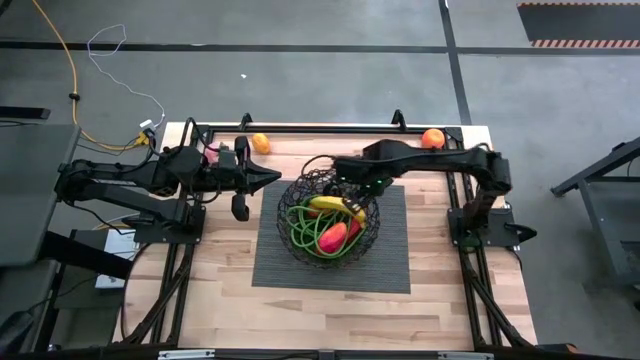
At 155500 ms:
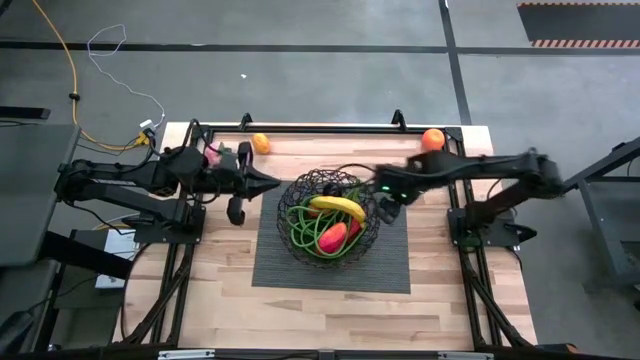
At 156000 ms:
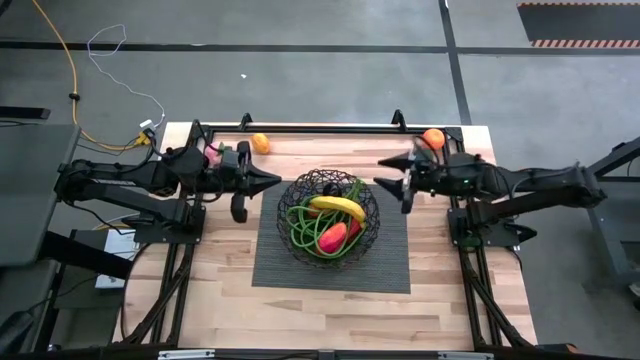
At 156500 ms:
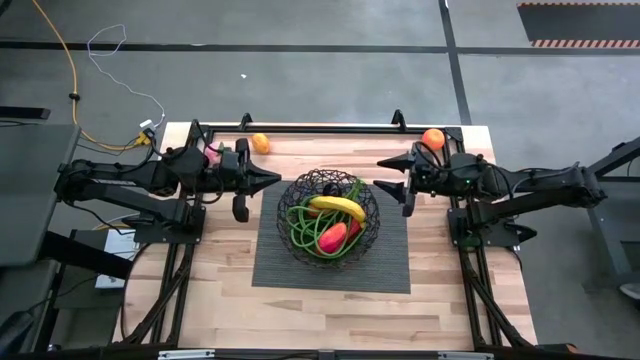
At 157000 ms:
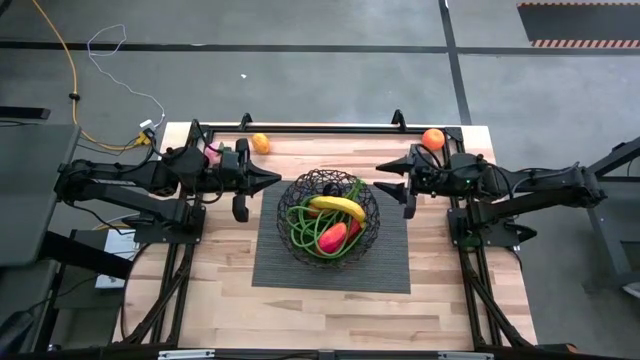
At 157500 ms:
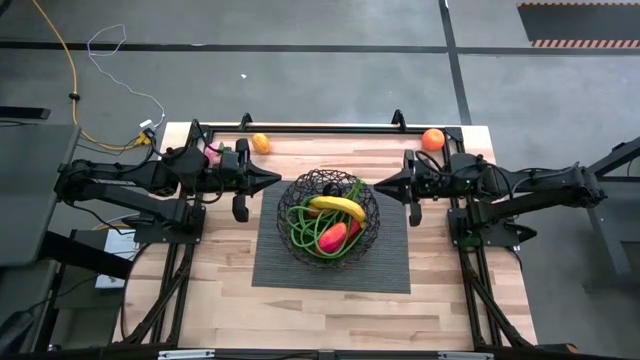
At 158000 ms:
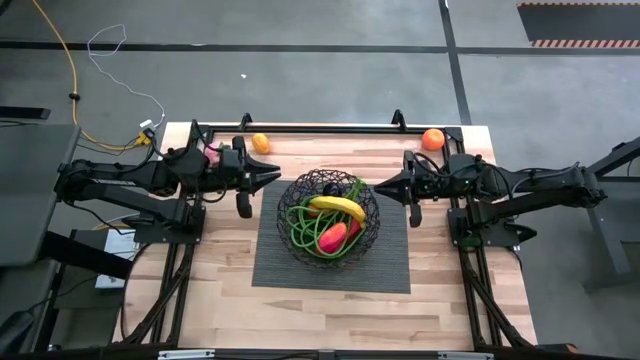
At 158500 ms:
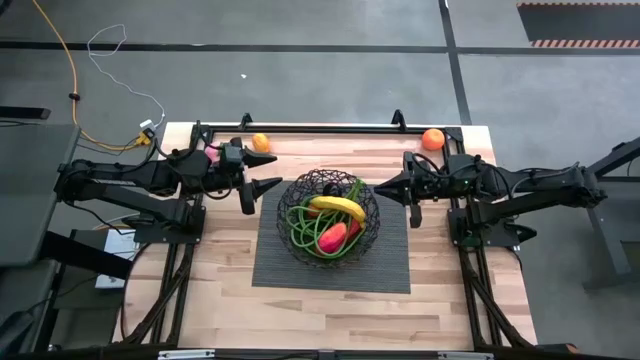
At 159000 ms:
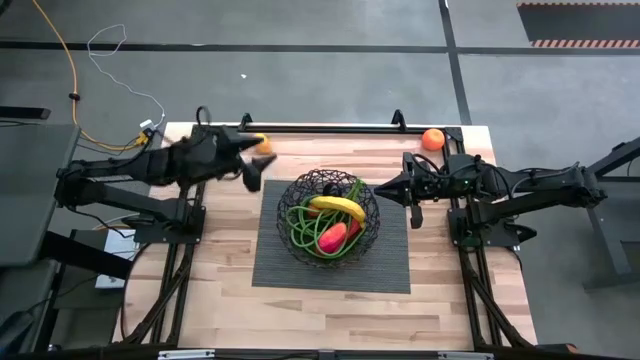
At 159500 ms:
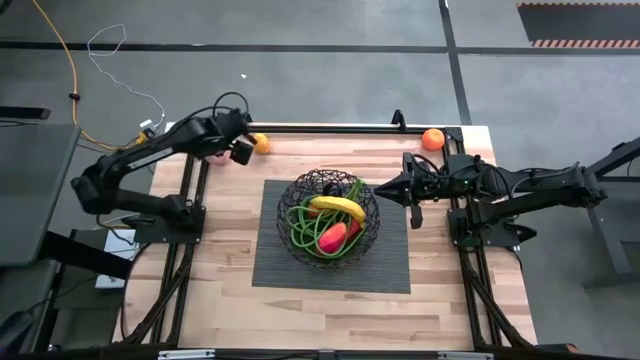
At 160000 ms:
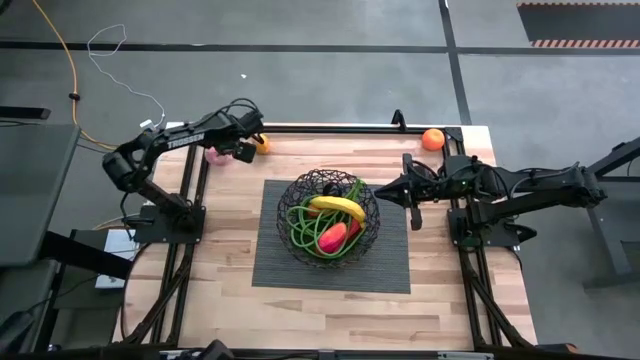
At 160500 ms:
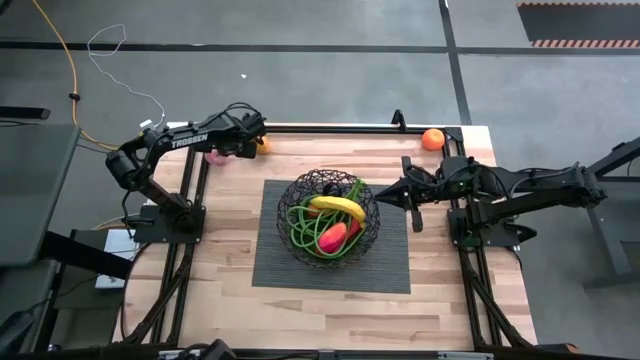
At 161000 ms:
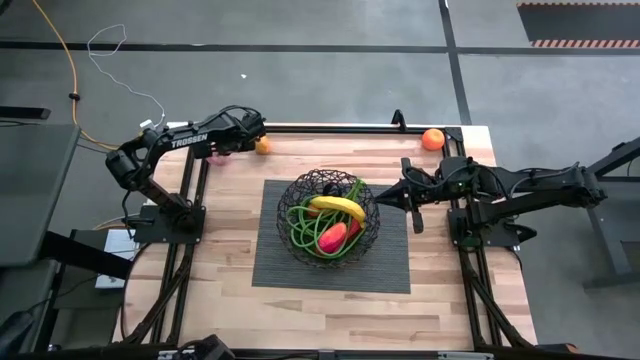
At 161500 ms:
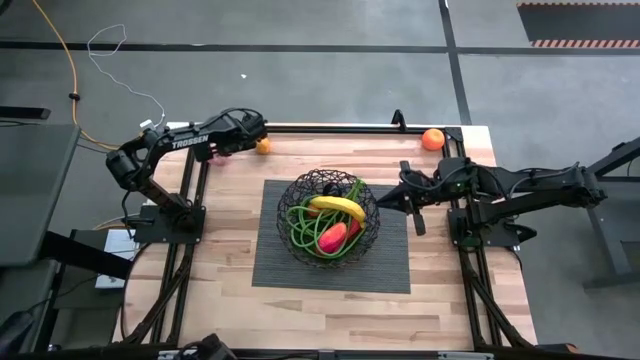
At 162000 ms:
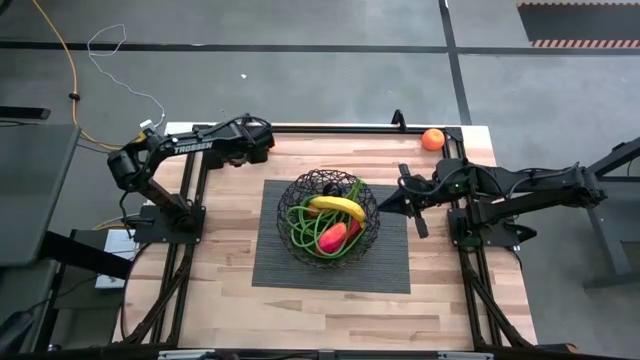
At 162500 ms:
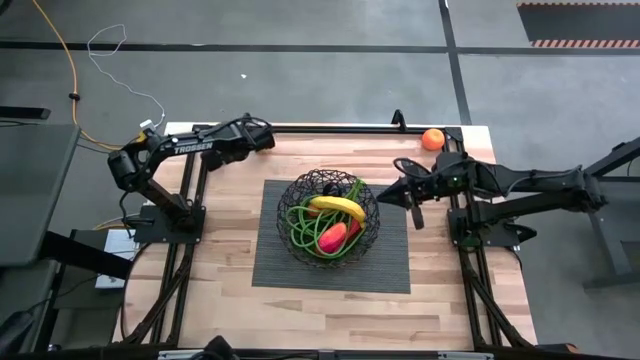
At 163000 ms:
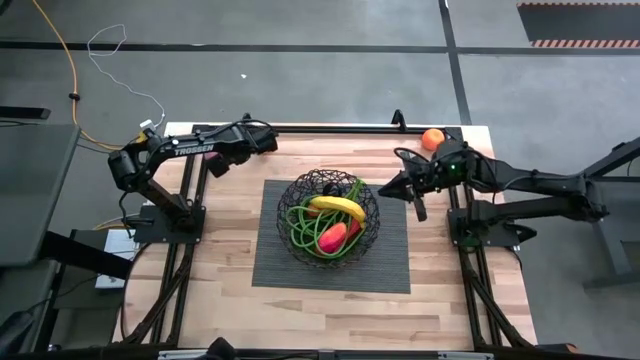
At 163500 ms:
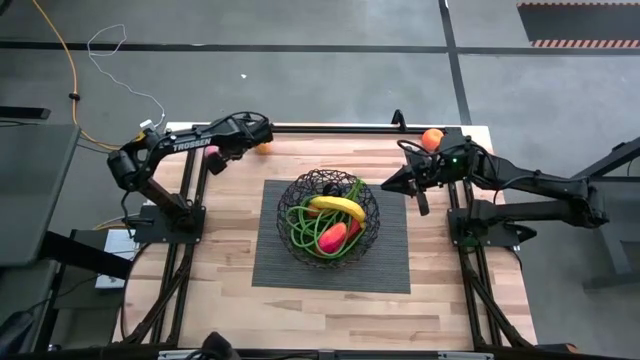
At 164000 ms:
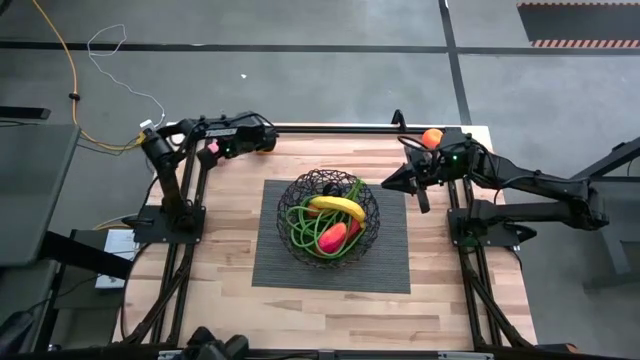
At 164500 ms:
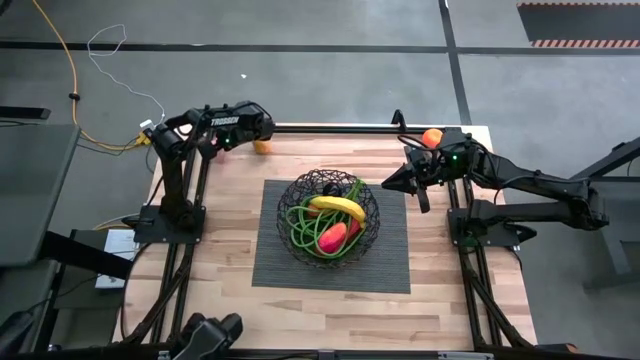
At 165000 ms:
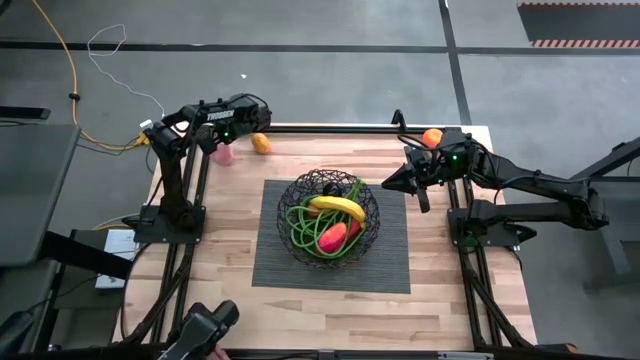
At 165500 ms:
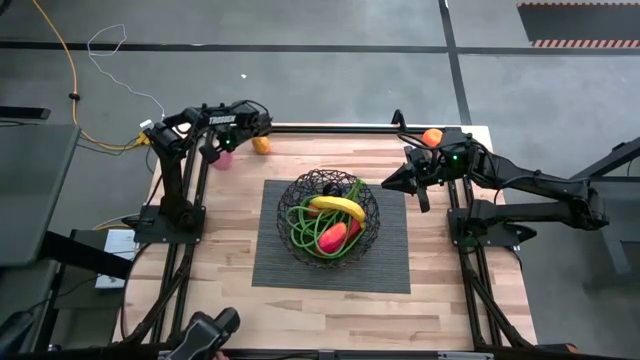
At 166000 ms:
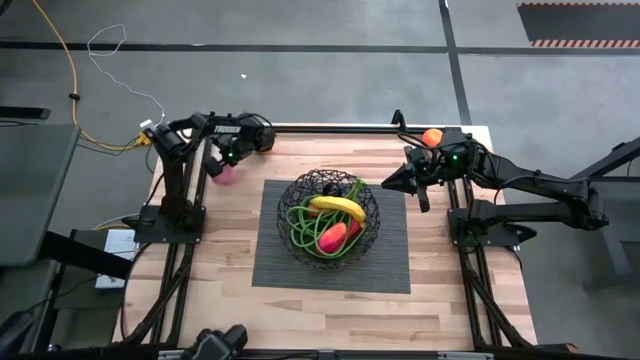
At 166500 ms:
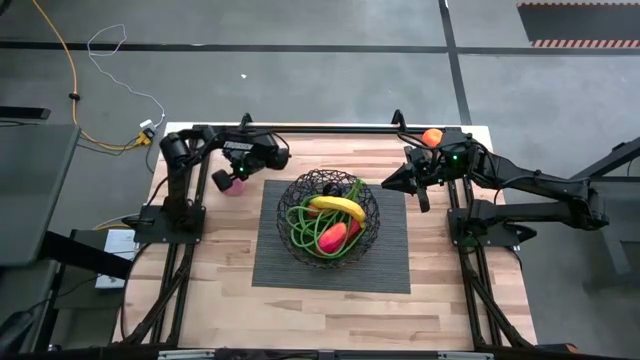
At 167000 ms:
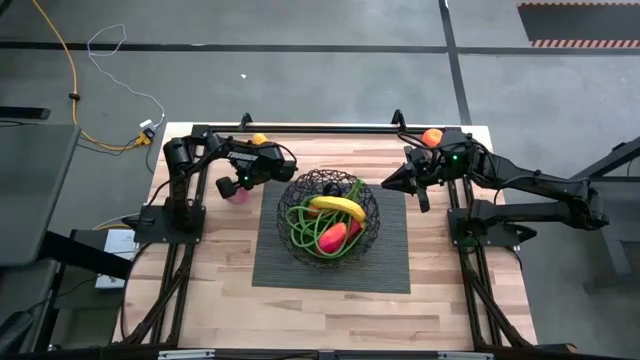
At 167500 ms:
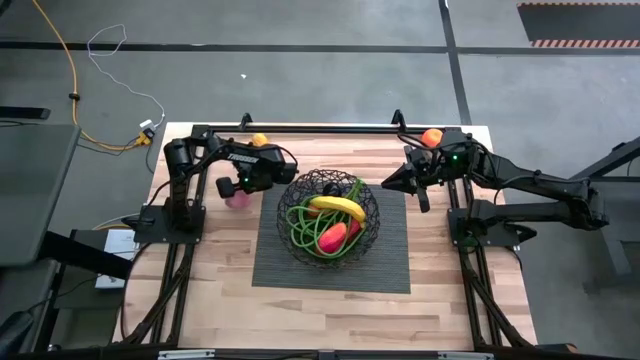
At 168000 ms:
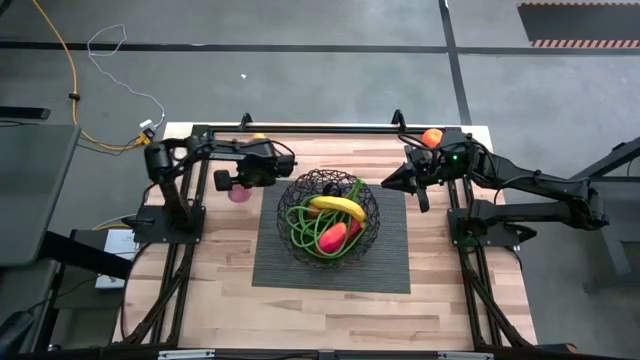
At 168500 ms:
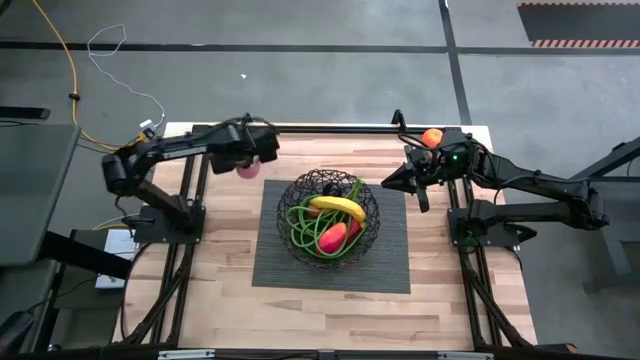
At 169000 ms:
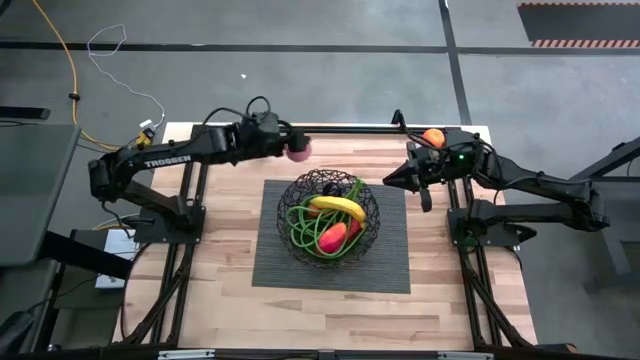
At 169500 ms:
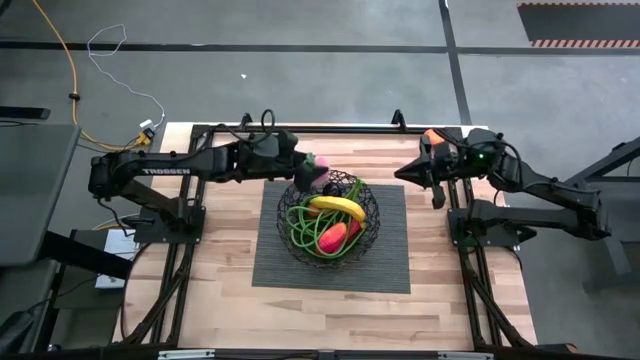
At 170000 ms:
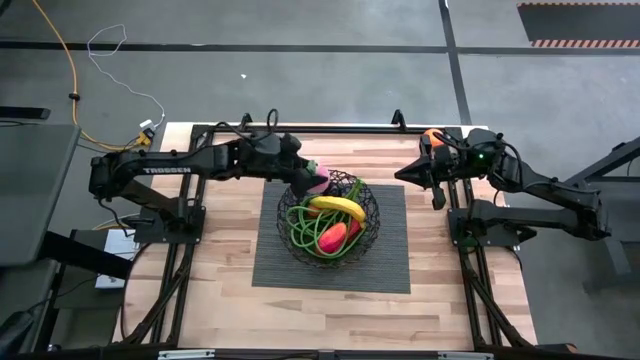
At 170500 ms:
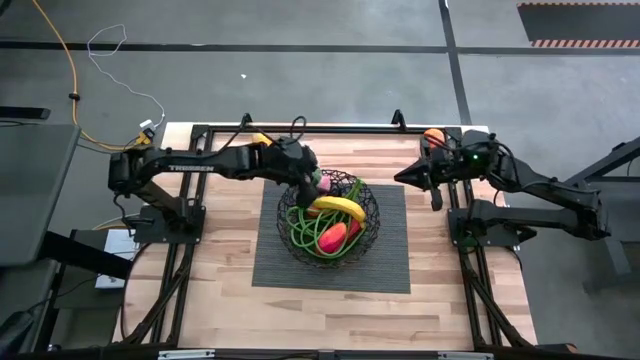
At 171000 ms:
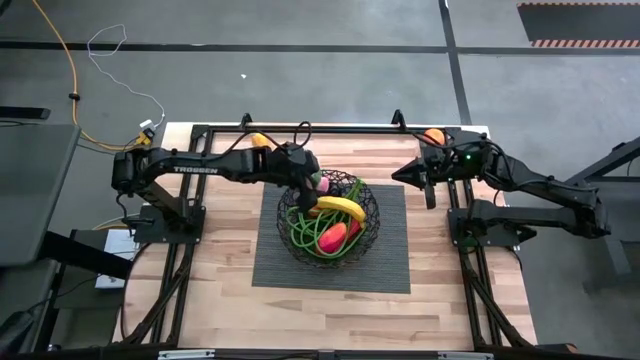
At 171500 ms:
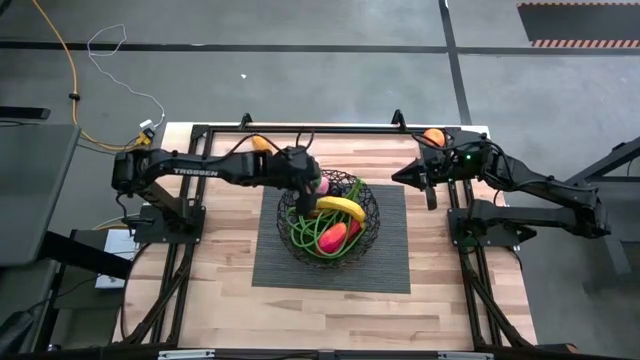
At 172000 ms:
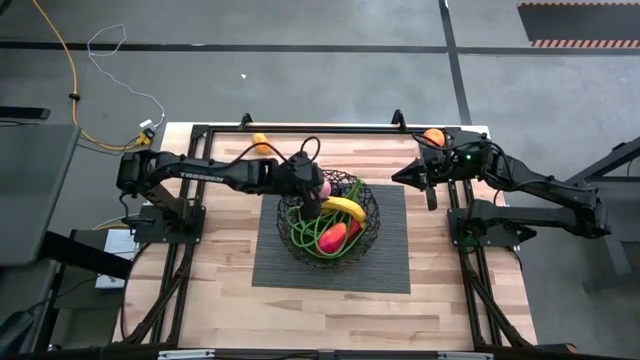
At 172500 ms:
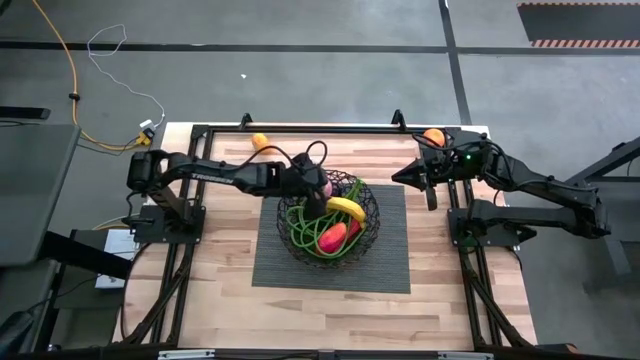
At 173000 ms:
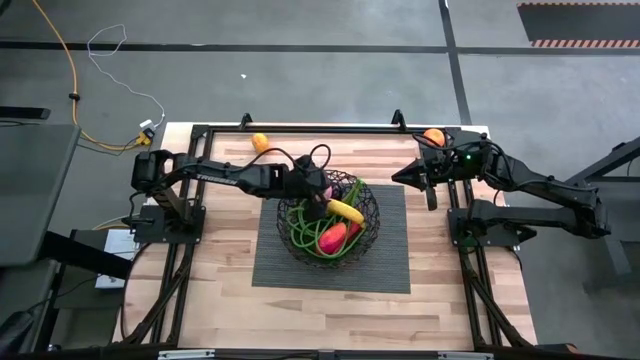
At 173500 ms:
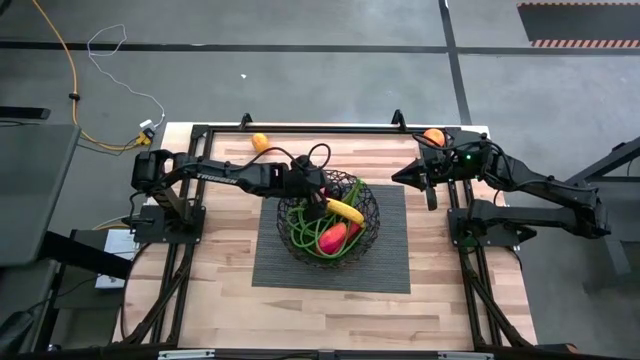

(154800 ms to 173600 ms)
Task: Build produce basket
Put the pink peach into the black wire basket

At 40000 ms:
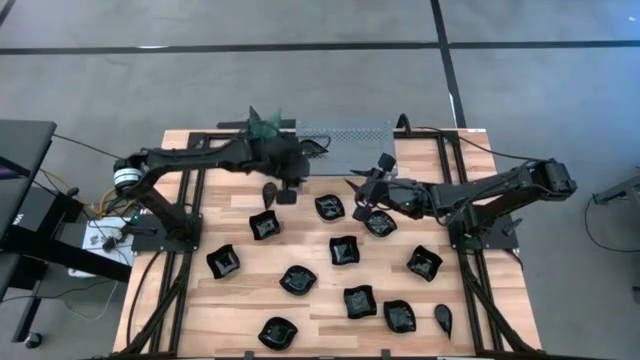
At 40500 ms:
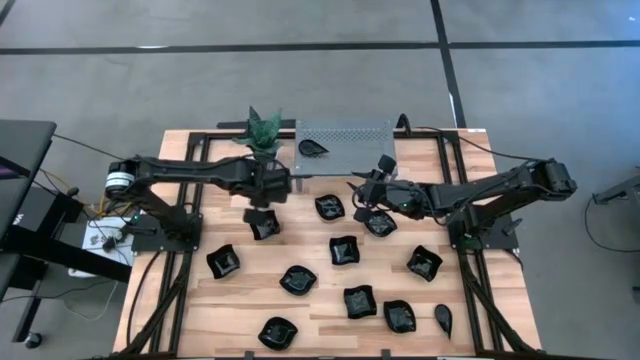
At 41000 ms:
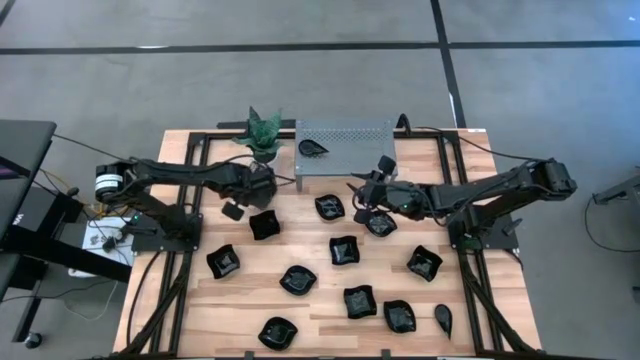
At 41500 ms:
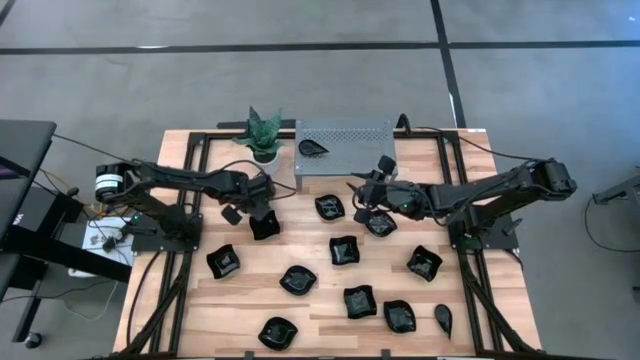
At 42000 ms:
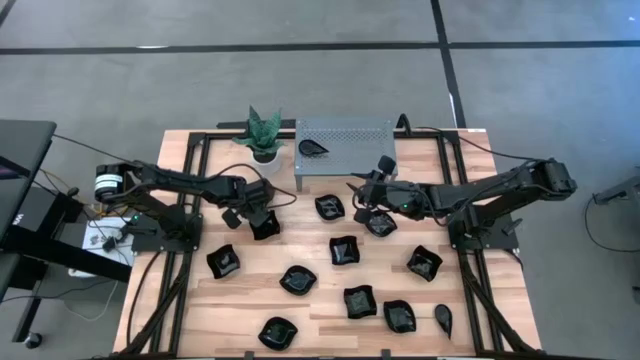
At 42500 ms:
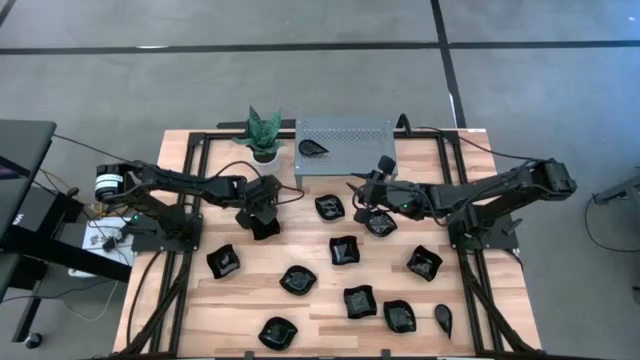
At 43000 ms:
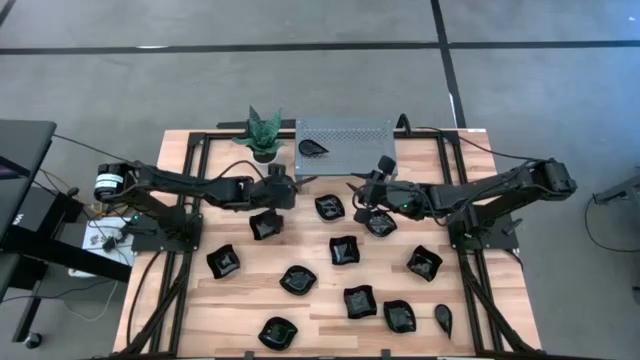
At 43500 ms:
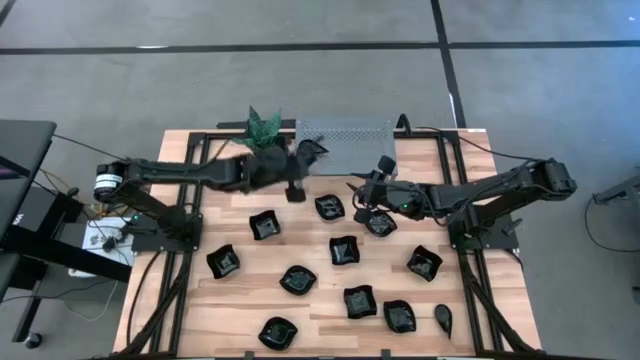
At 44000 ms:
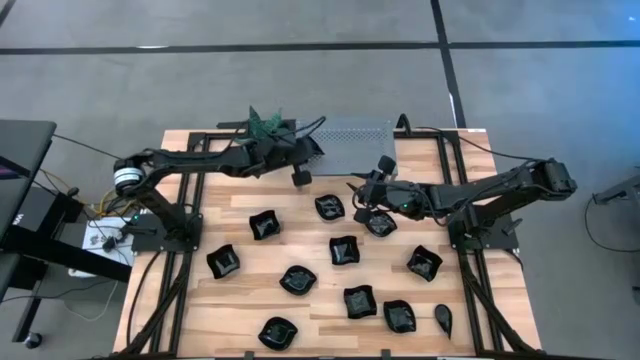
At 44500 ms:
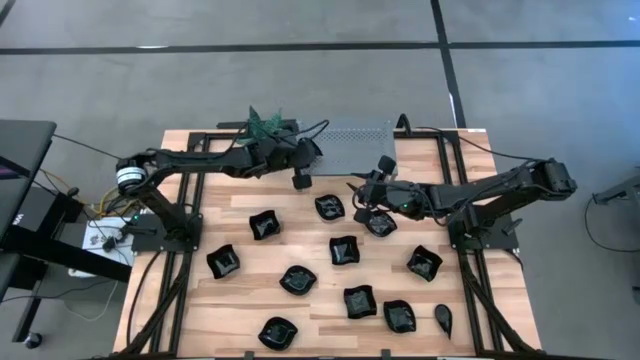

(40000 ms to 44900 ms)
Task: Pick & Place Mini shaped plates
Stack the top drop-shaped plate on top of the drop-shaped plate on the shelf
